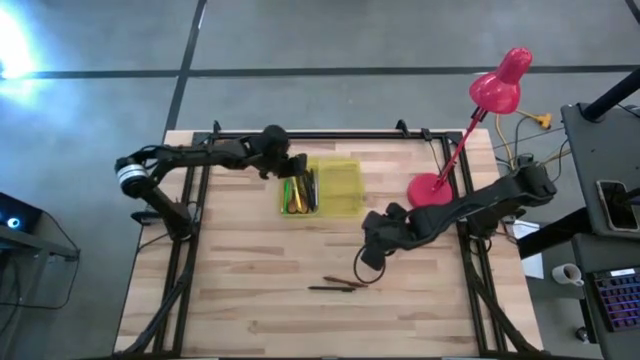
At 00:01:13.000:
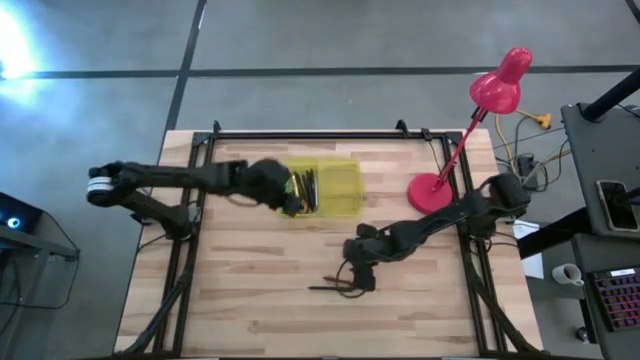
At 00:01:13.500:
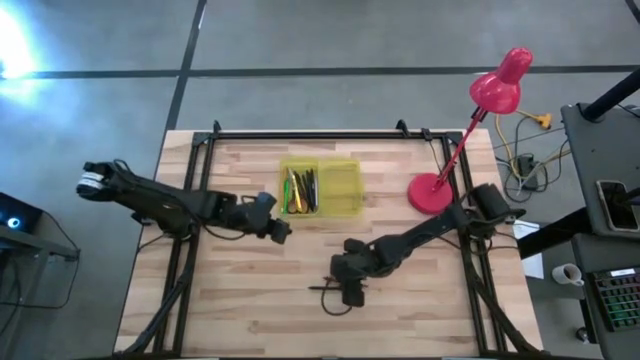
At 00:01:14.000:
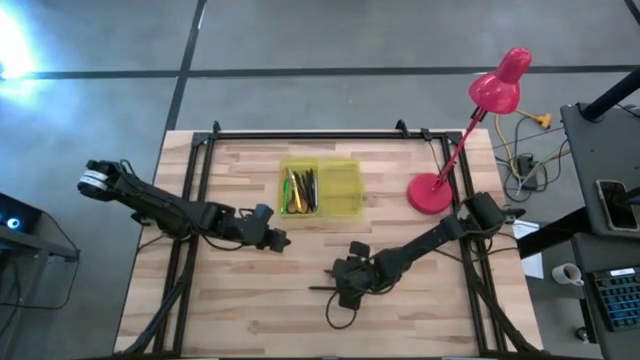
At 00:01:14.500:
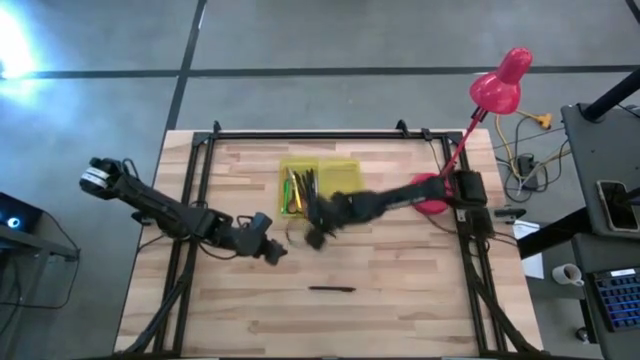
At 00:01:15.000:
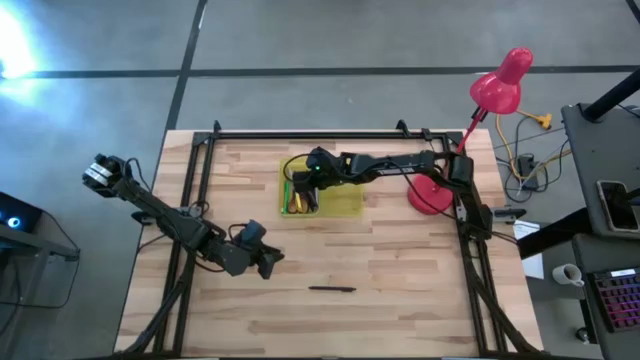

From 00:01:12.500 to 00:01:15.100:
Task: Pick & place school supplies into a supply box
Put the brown pen into the supply box

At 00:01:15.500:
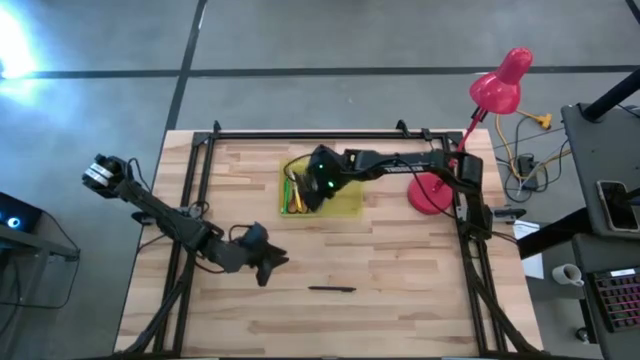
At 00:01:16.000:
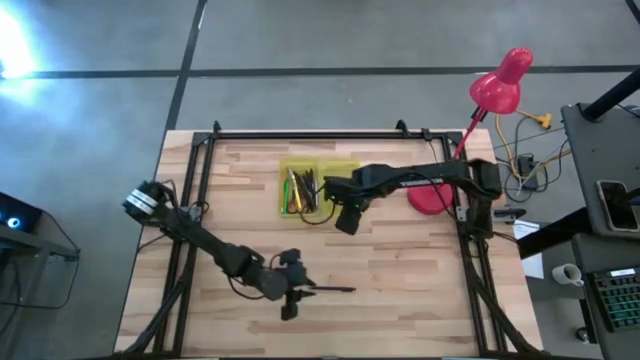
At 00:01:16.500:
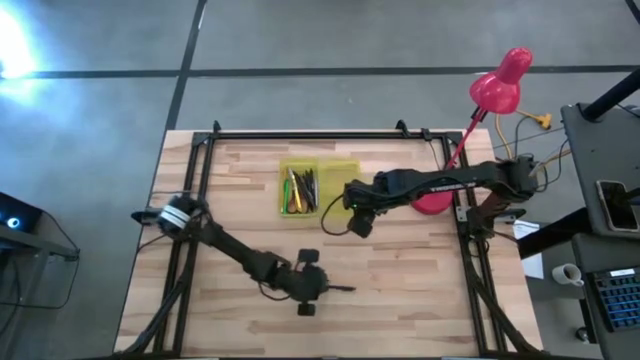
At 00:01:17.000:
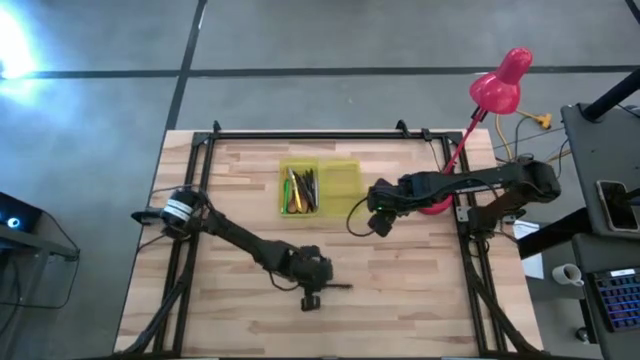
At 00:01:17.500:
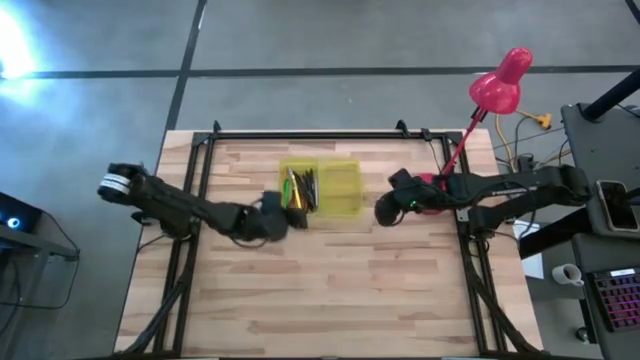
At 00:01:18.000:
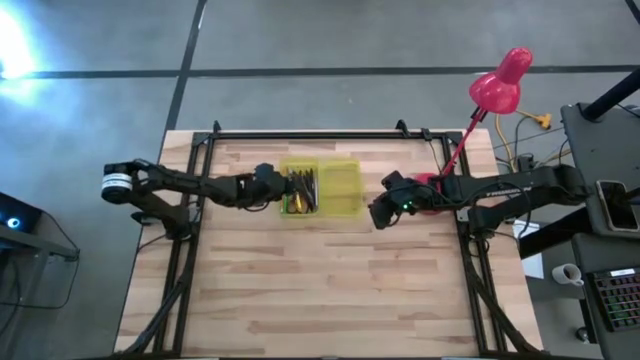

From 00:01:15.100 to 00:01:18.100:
Put the black pen into the supply box

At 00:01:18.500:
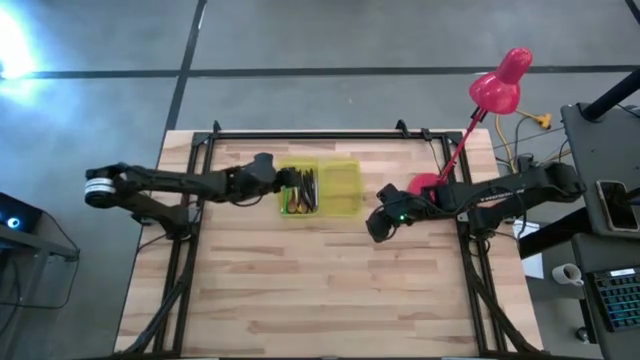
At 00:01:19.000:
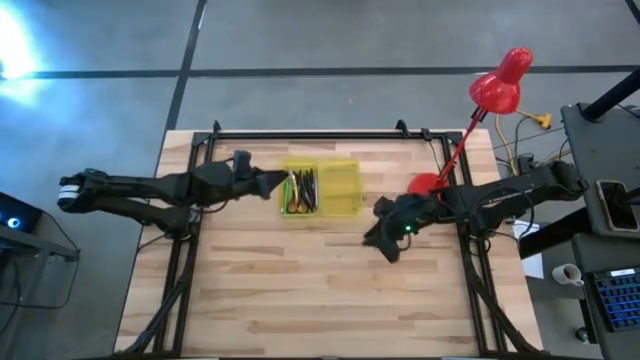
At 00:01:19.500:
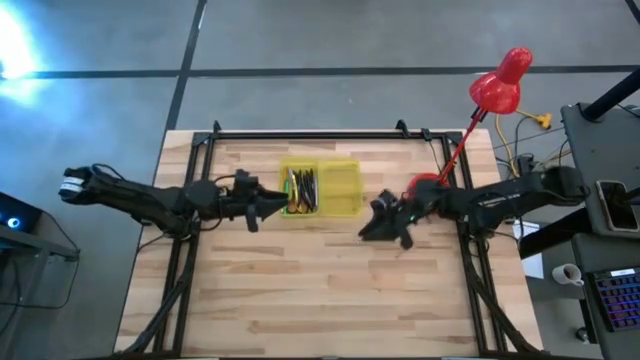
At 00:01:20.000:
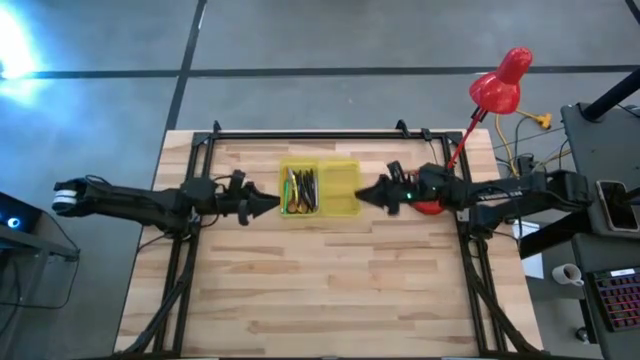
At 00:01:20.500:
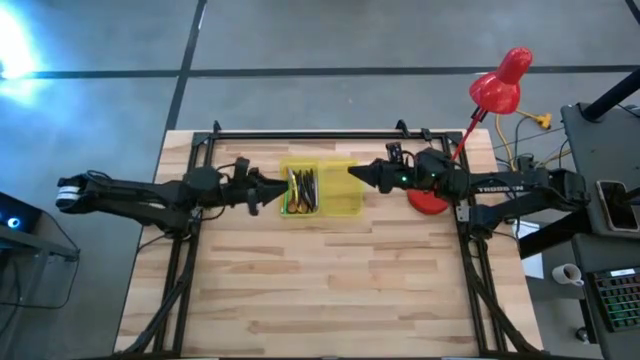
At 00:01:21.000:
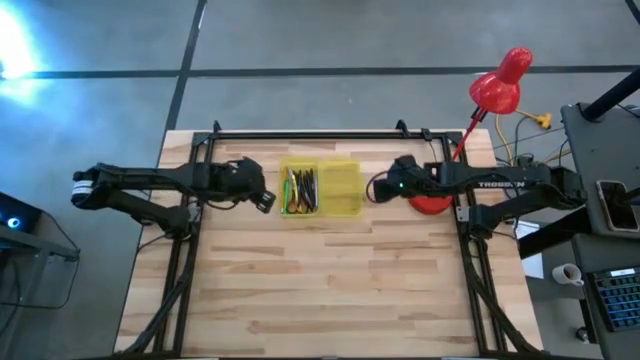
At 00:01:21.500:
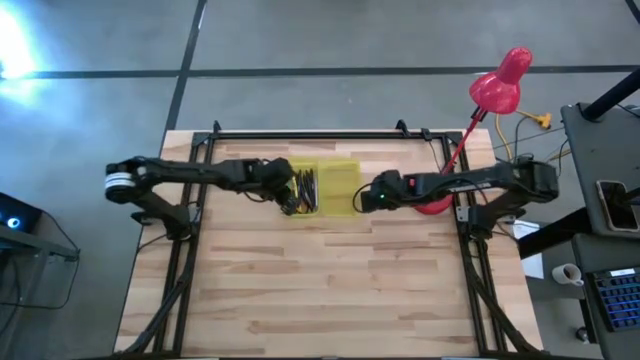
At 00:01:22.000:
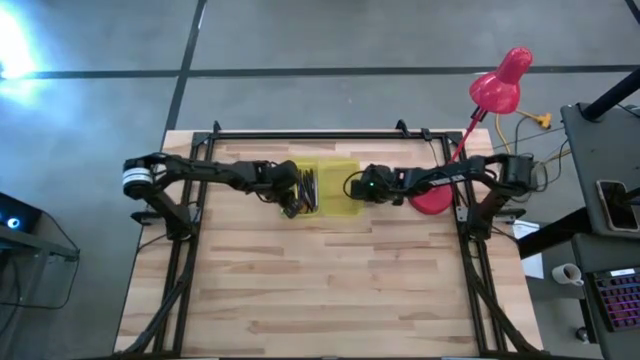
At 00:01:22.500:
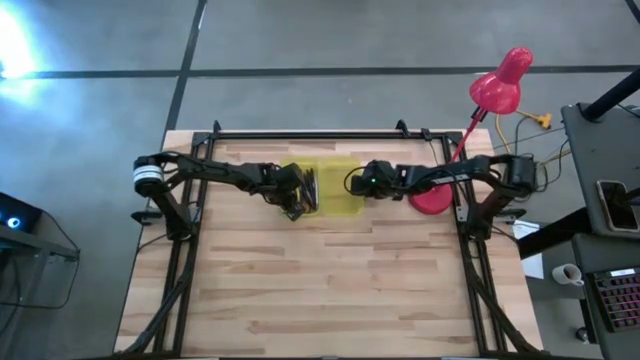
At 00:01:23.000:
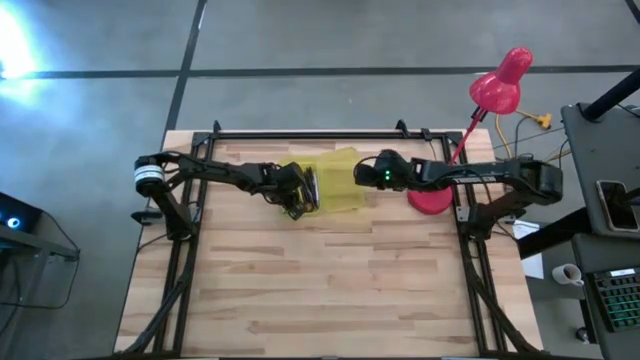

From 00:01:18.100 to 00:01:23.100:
Close the supply box

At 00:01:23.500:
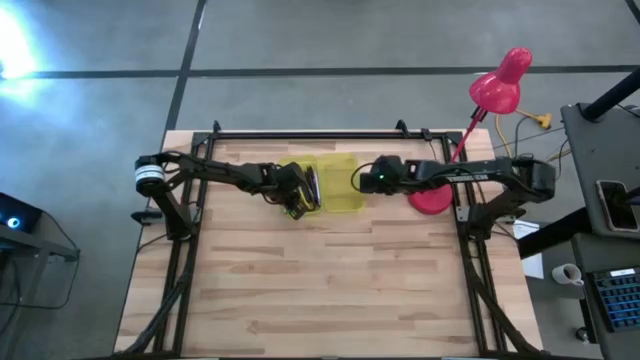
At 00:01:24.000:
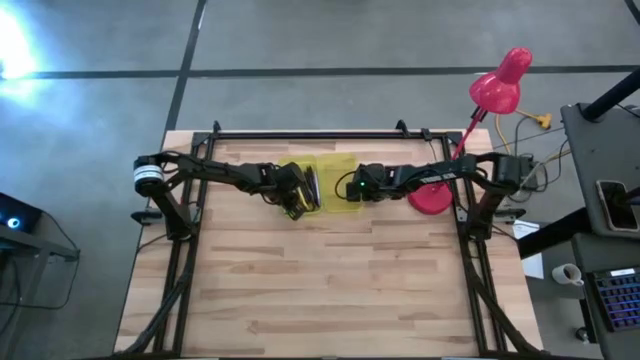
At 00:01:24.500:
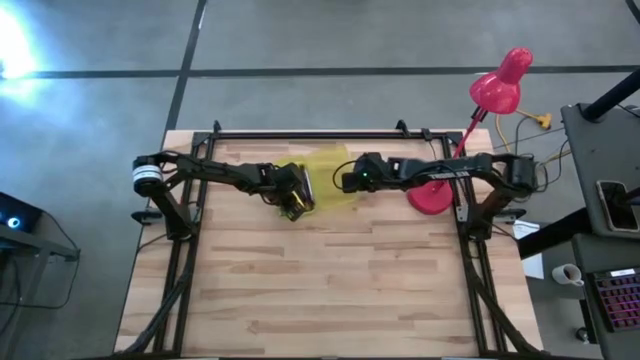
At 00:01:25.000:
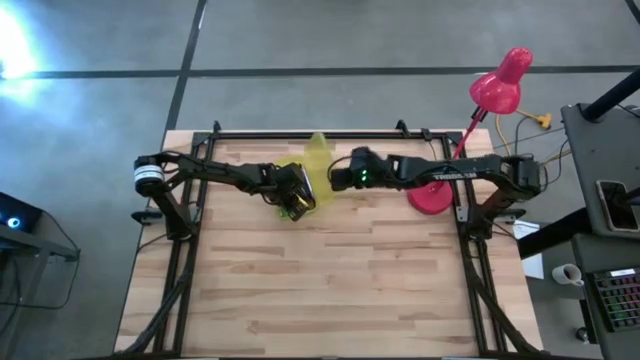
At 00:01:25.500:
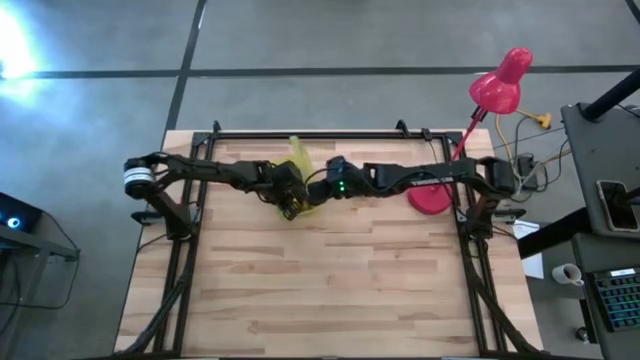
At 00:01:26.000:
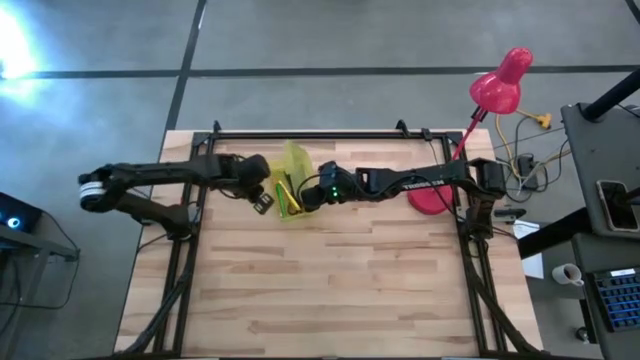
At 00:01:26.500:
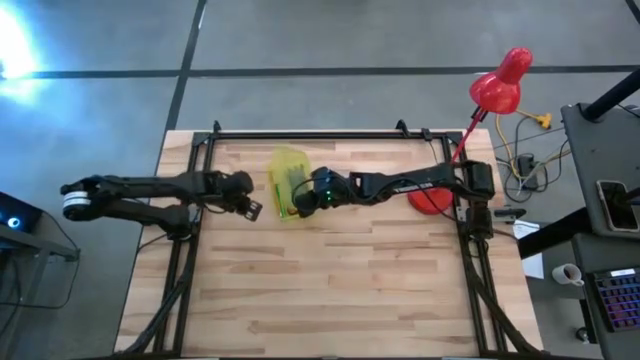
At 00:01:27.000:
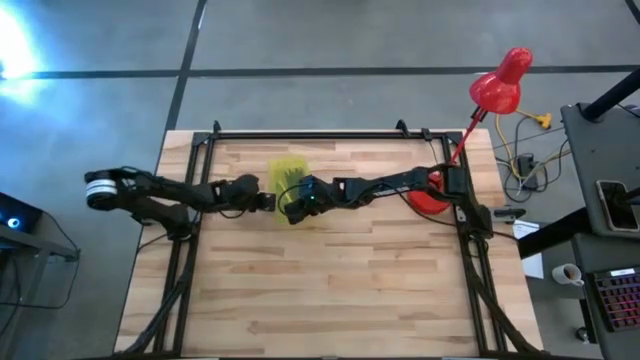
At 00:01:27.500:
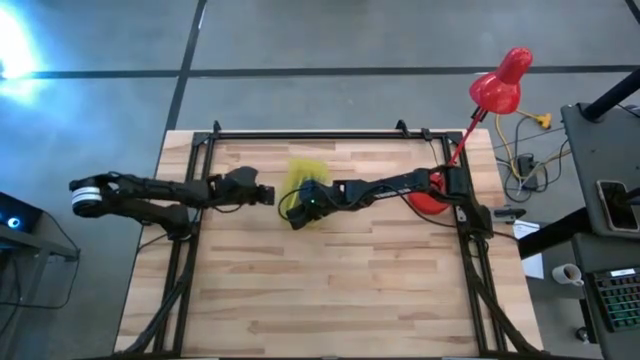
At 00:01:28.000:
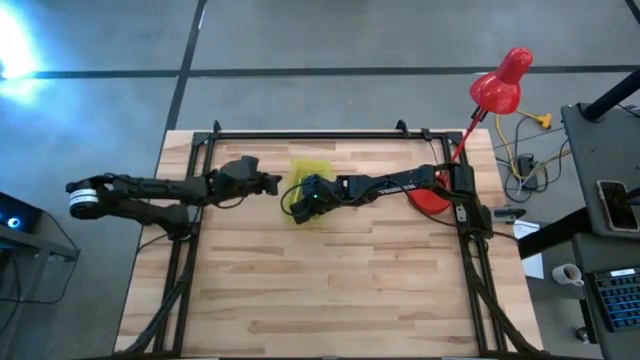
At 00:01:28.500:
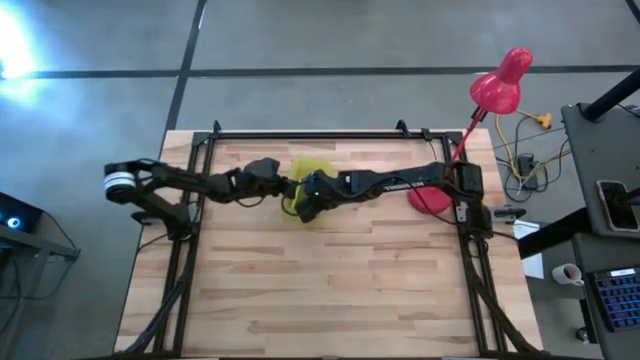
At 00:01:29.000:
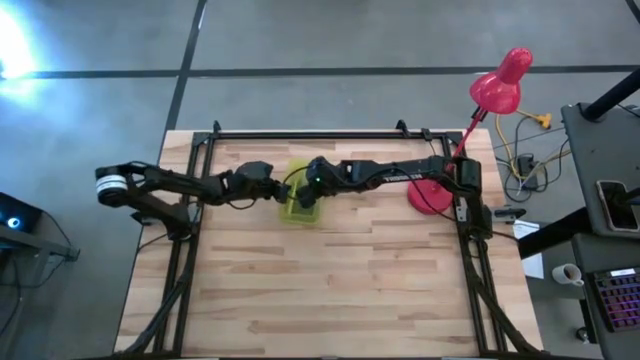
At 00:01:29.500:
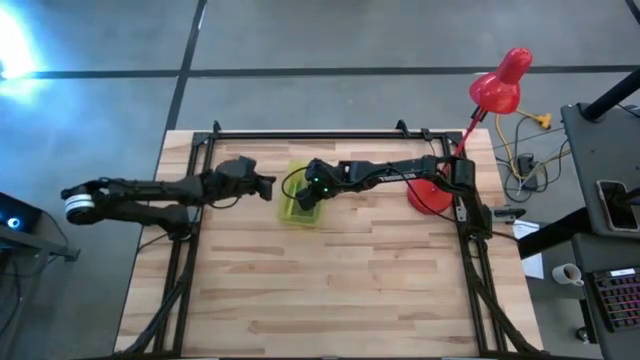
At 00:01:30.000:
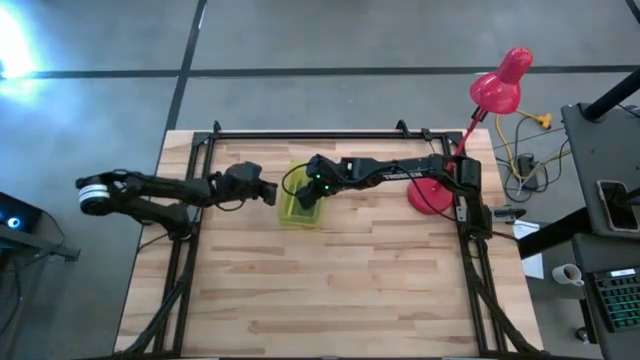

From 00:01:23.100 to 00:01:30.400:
Close the supply box

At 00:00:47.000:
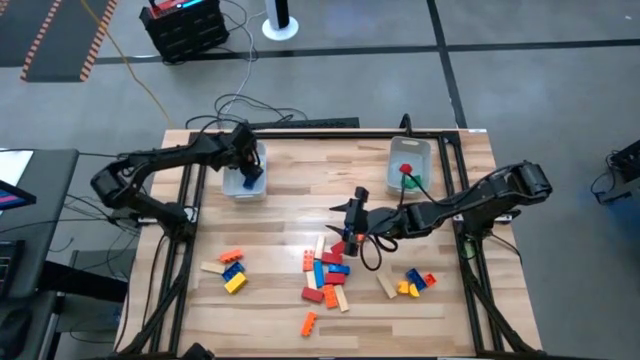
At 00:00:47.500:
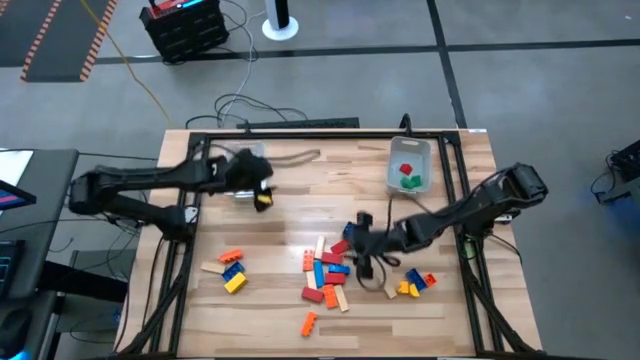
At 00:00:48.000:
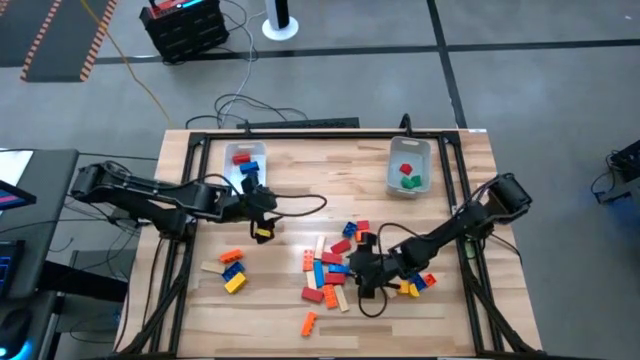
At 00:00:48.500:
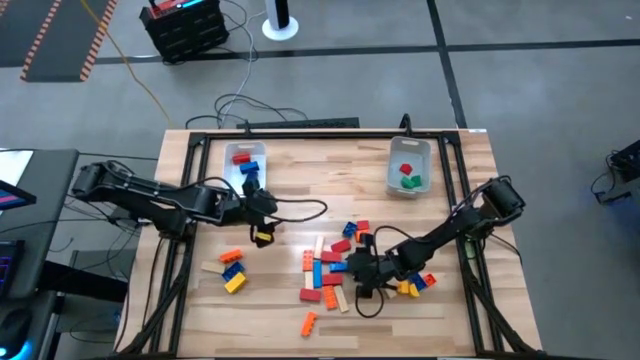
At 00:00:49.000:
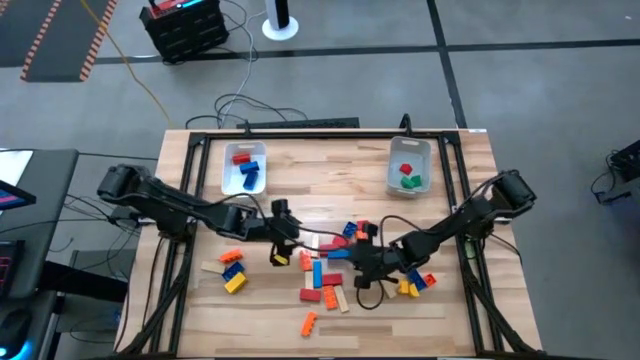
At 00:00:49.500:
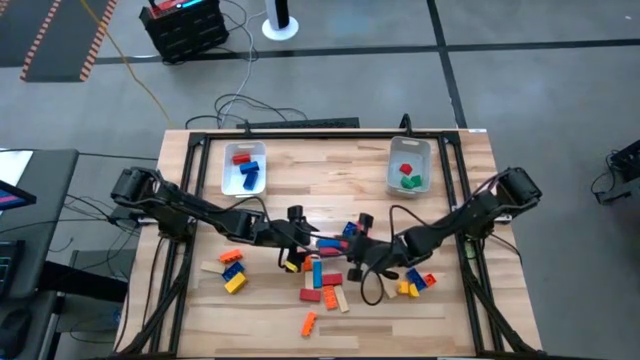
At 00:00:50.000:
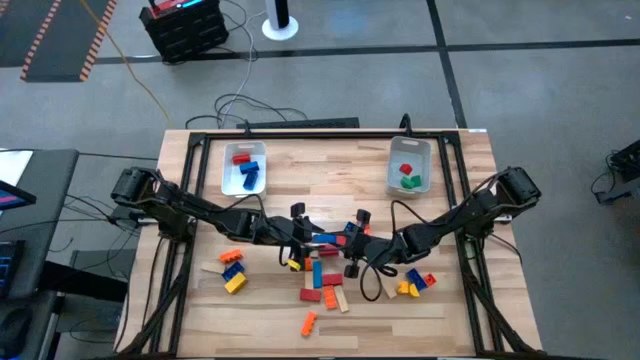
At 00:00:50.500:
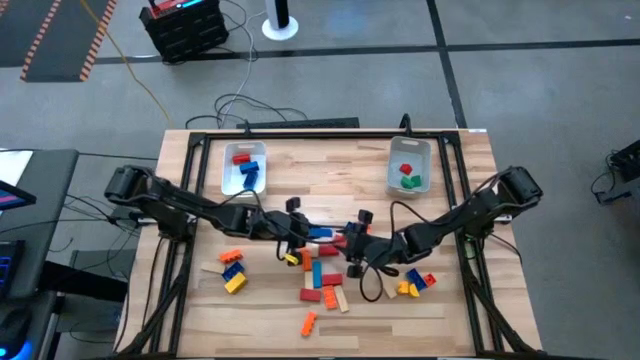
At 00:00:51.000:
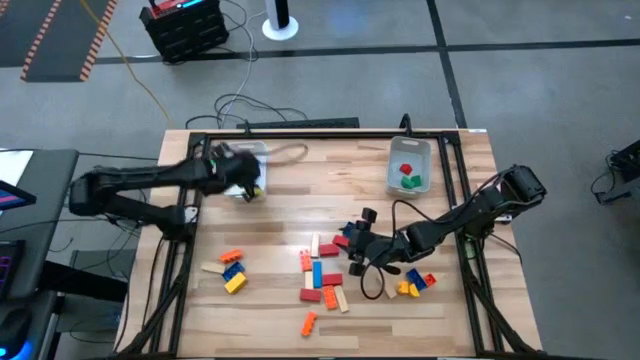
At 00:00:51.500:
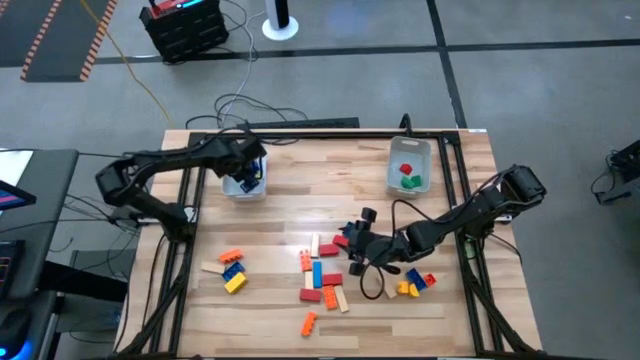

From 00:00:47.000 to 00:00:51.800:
Task: Sort blocks by size
Put the large blue game piece into the white bin
